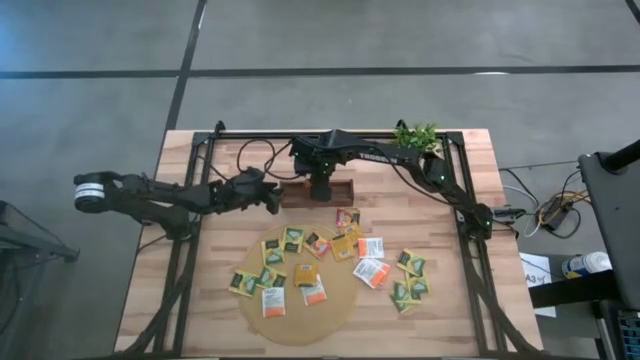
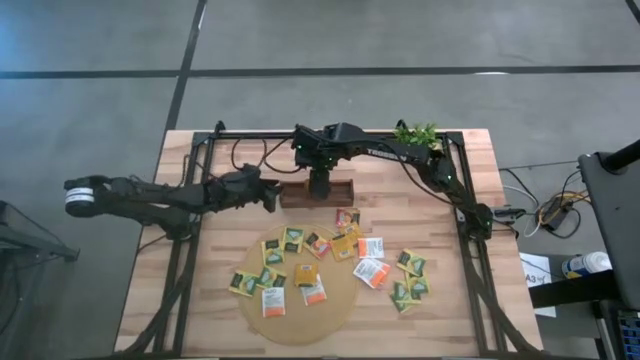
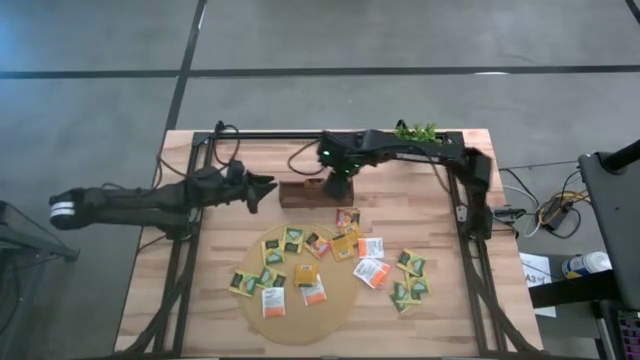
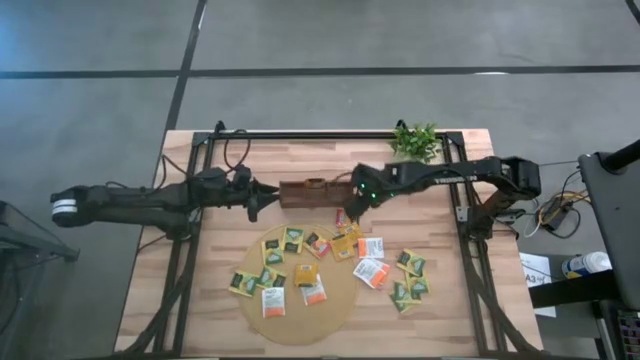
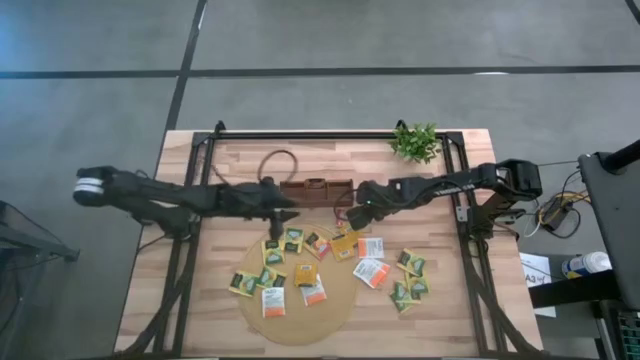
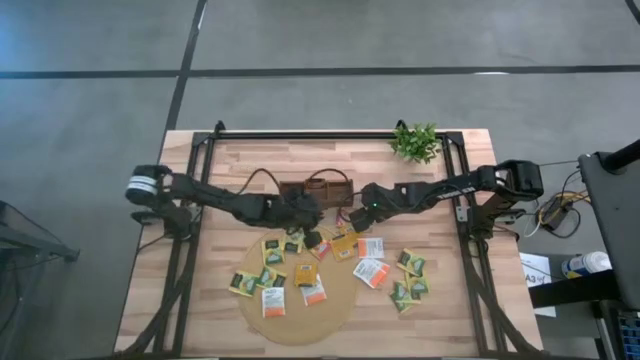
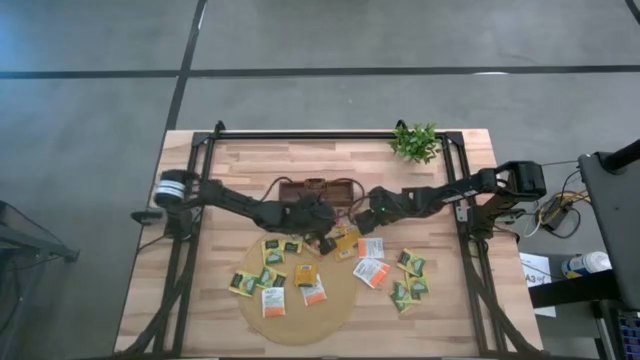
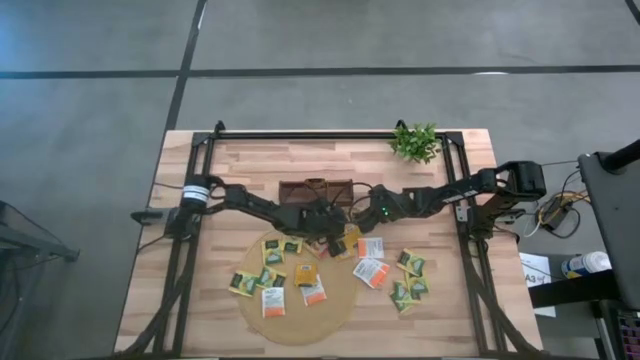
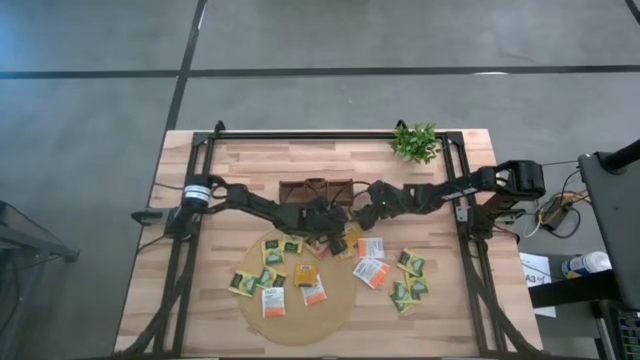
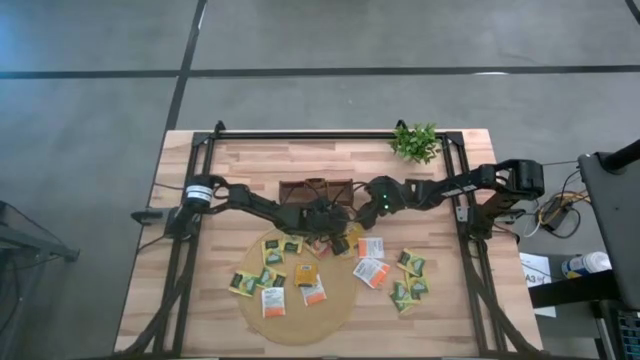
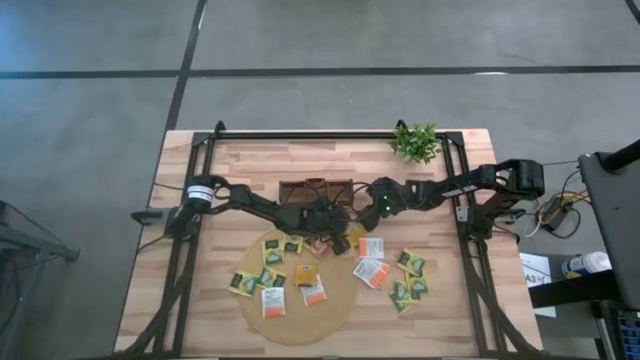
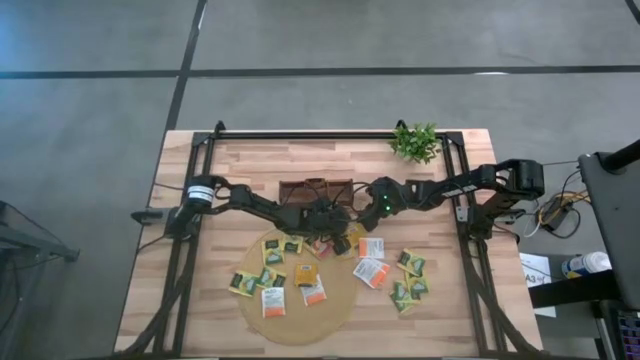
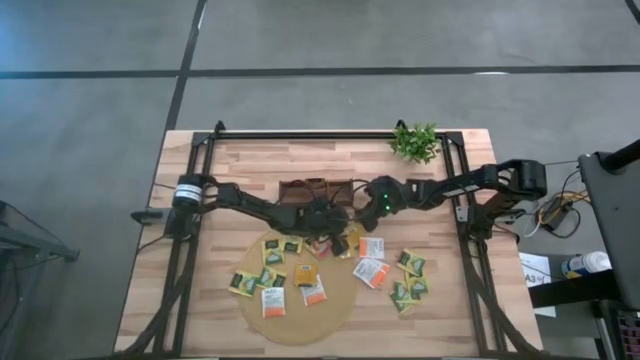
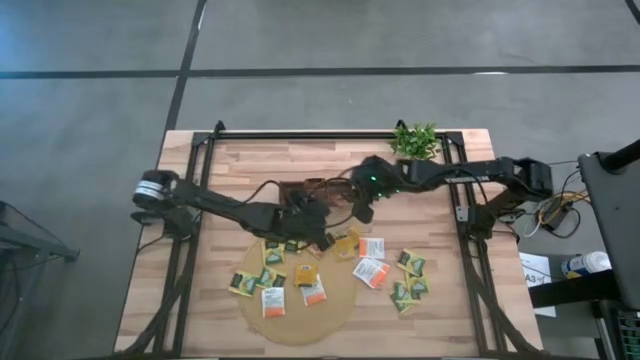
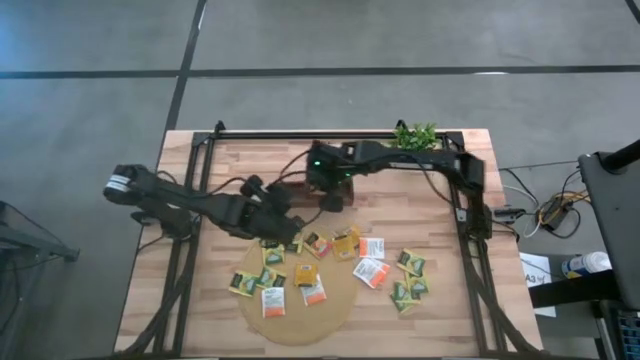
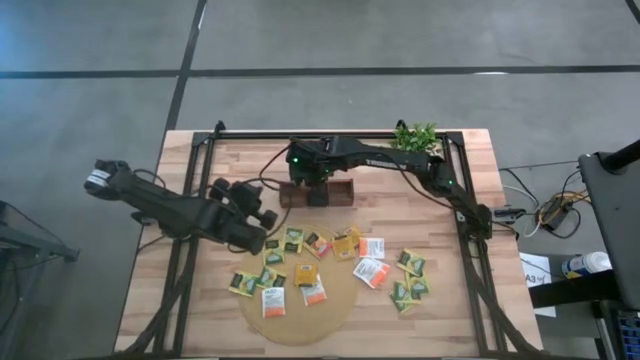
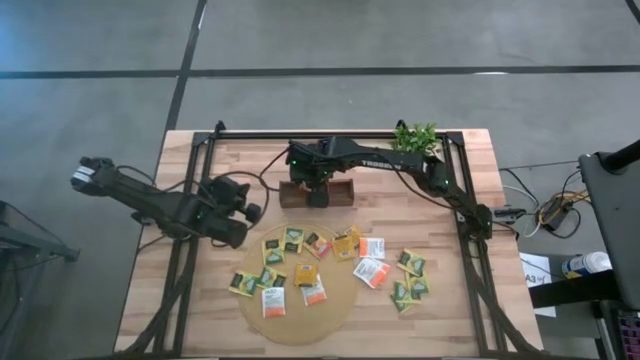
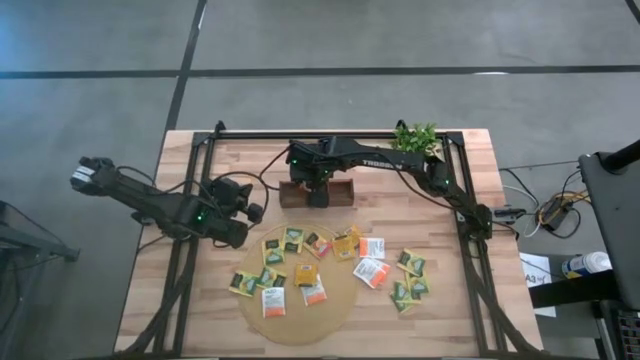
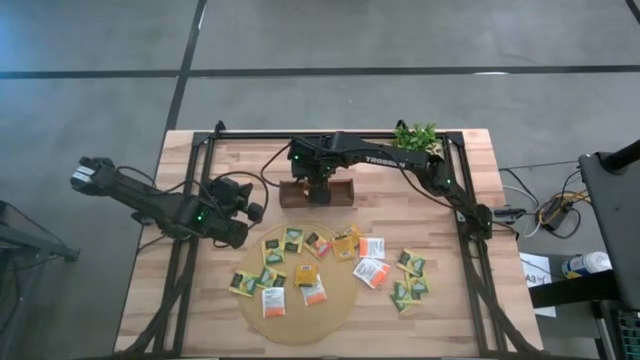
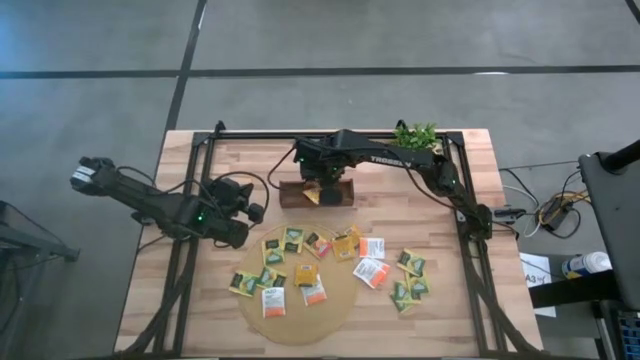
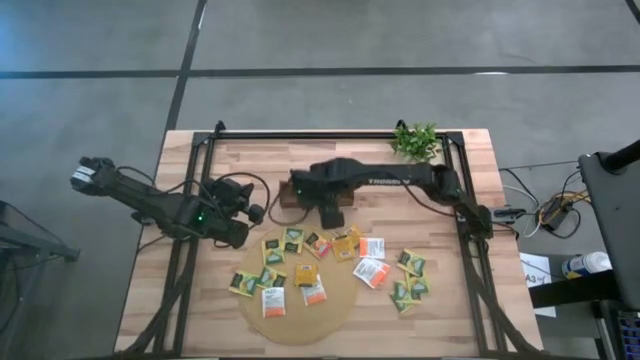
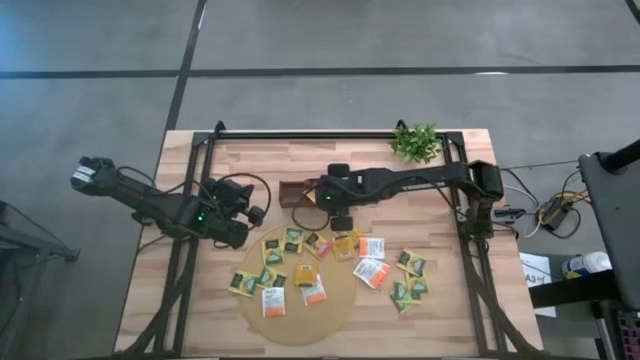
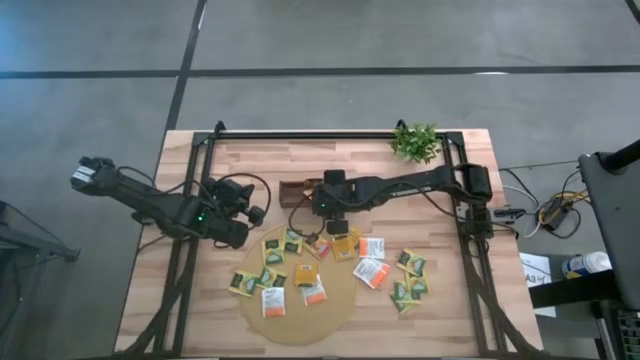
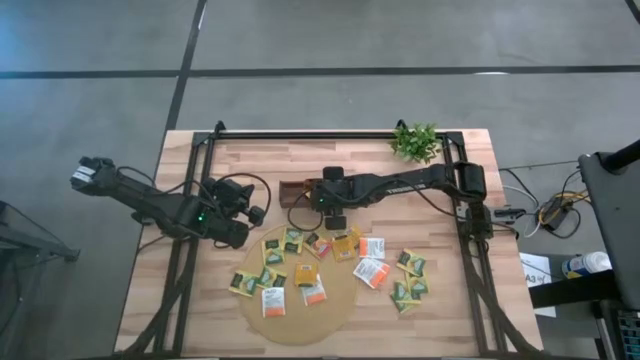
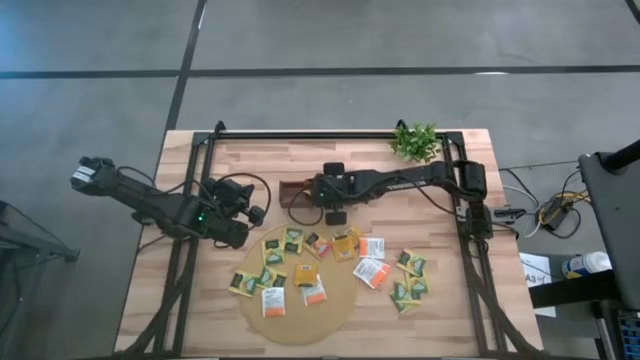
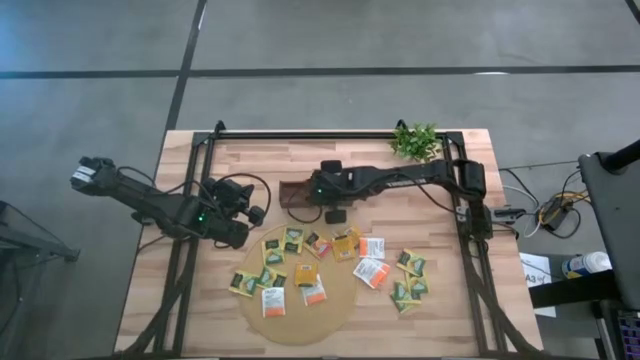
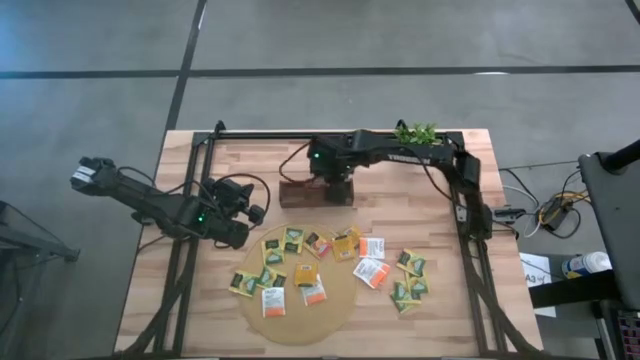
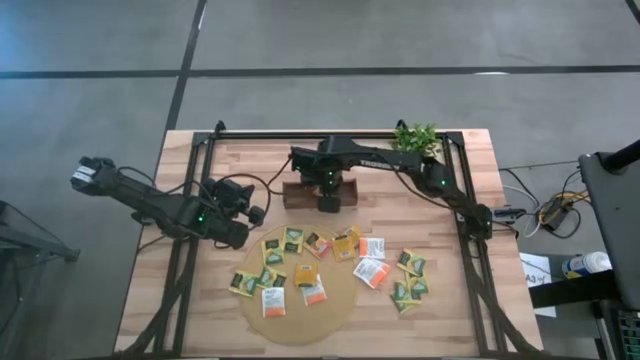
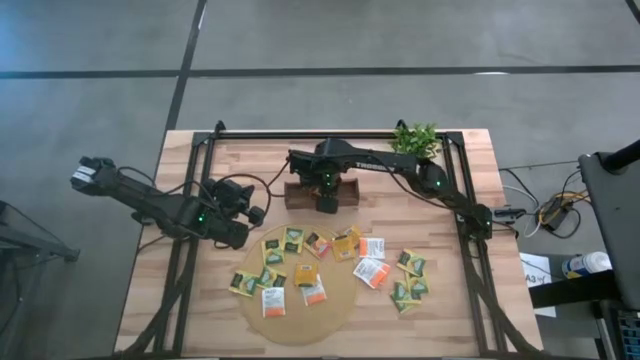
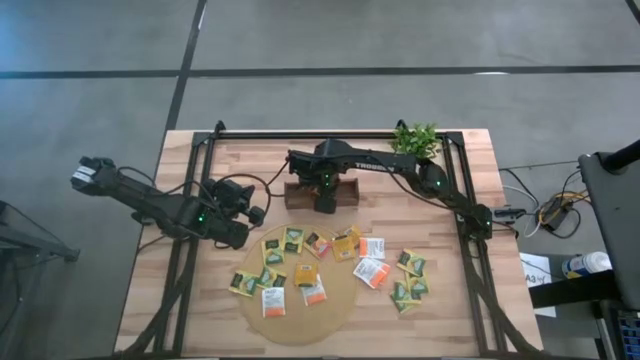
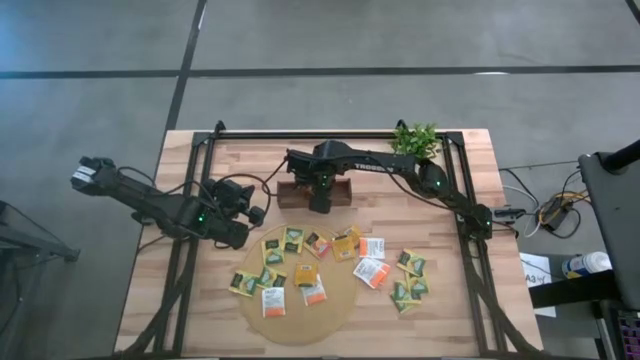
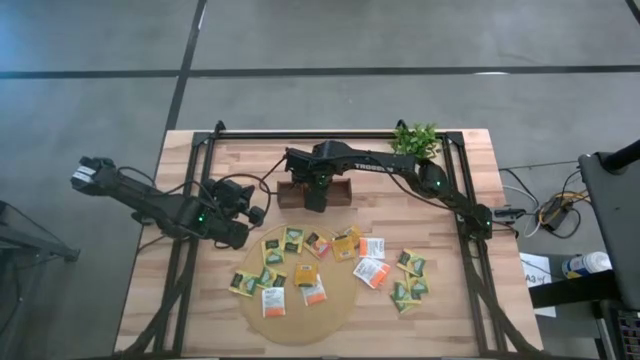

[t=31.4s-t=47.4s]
Task: Pick & Place Tea
Put the yellow tea bag into the middle section of the wooden organizer

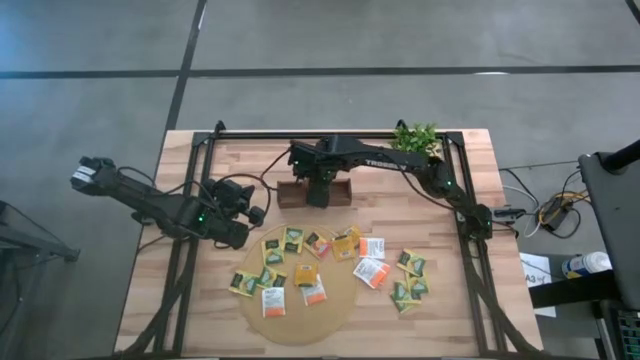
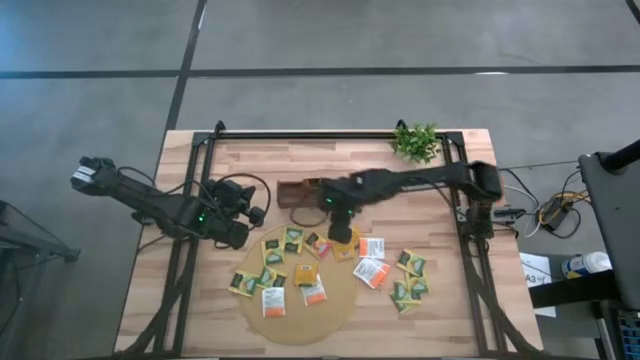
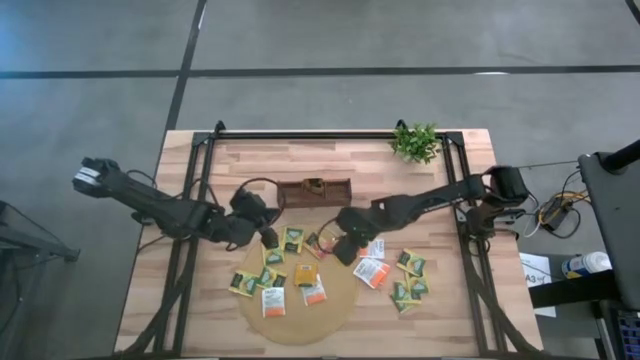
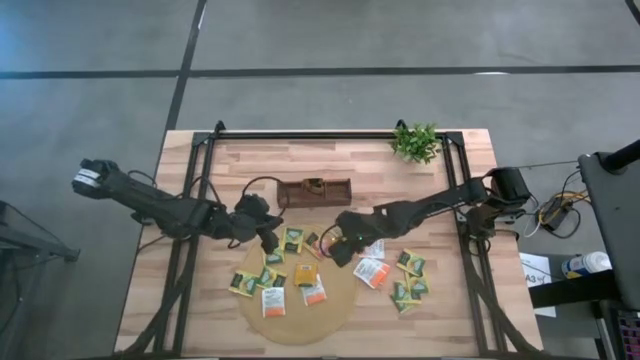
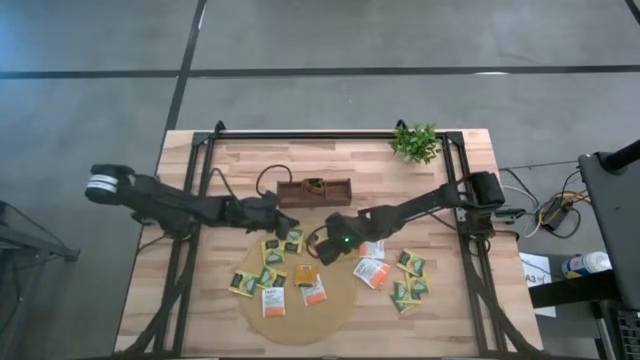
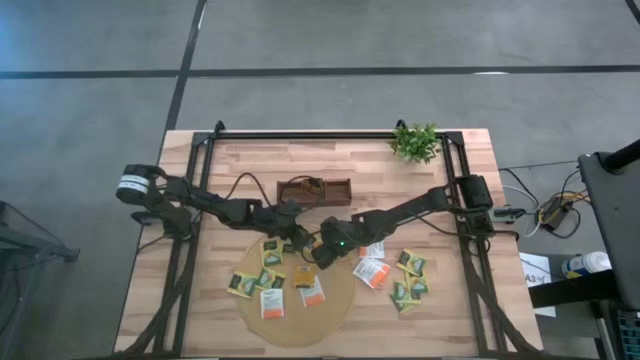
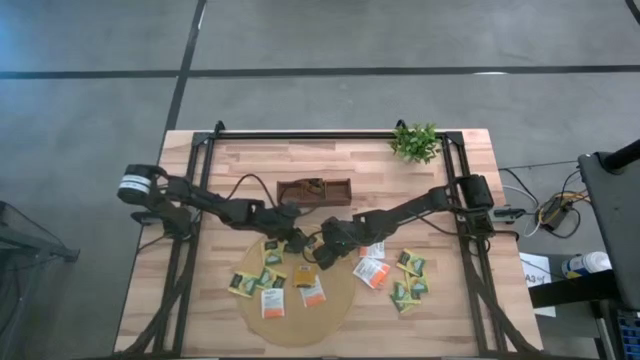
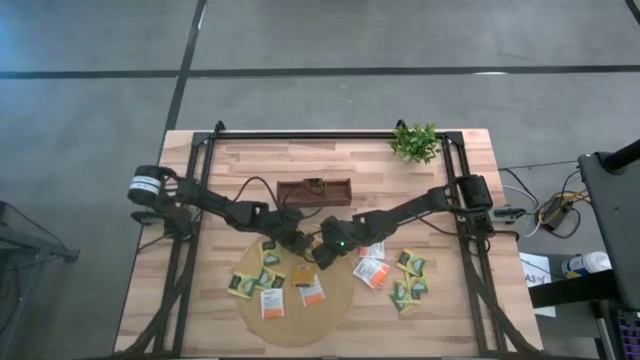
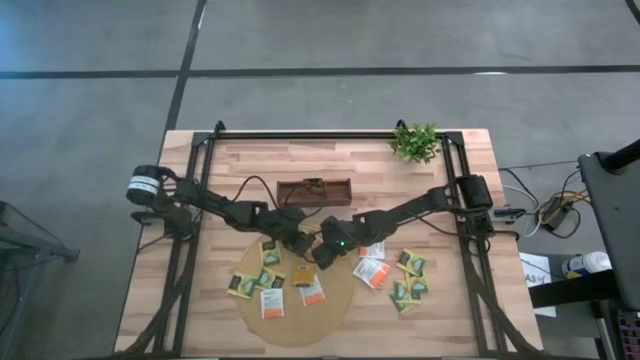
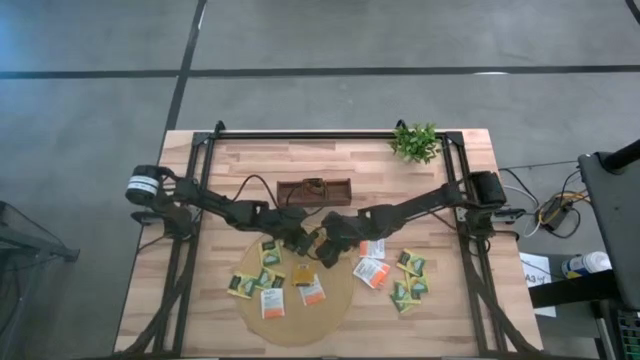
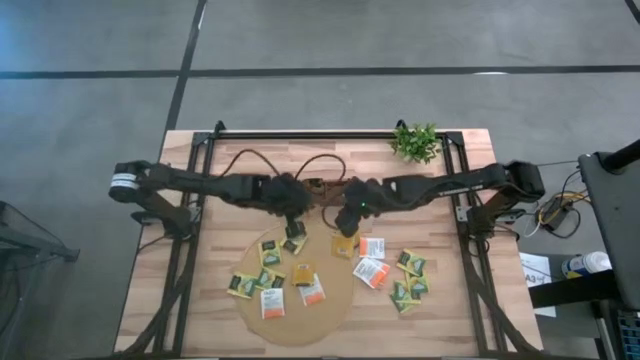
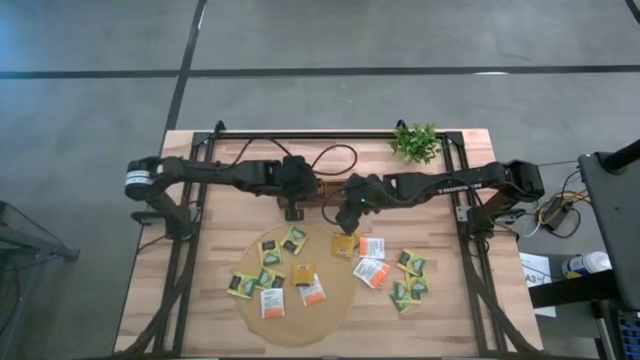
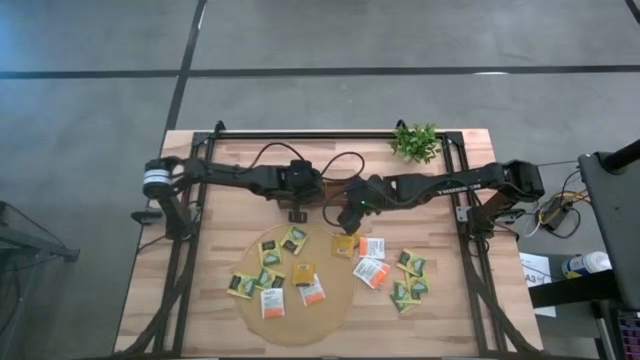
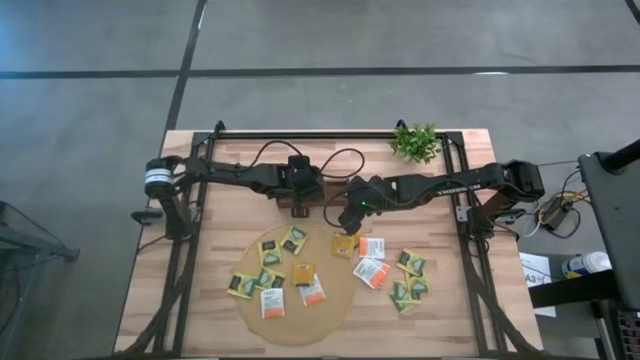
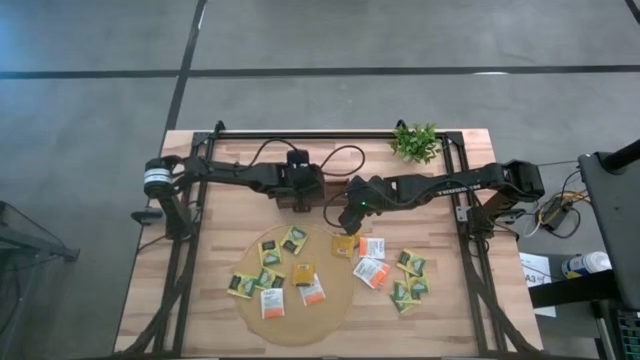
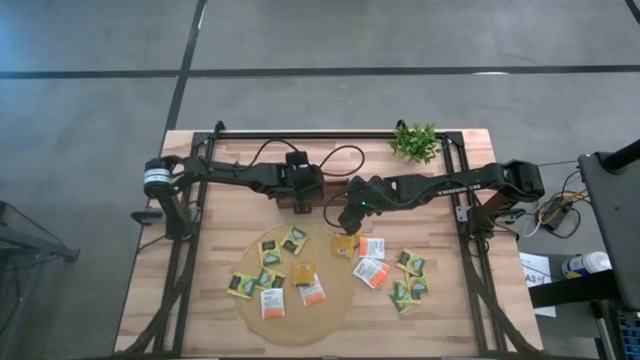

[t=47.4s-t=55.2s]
Put the yellow tea bag into the middle section of the wooden organizer
